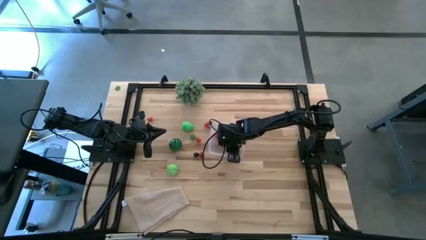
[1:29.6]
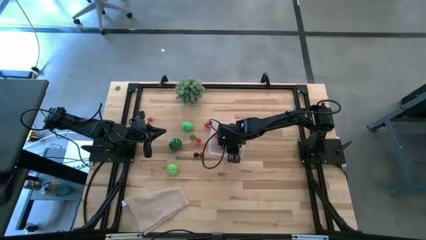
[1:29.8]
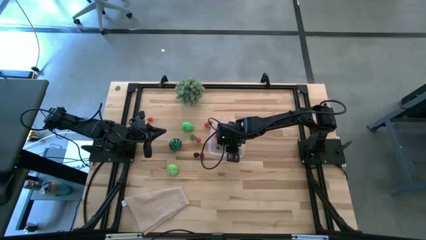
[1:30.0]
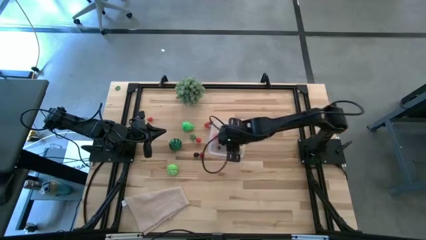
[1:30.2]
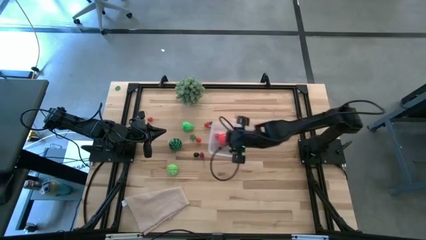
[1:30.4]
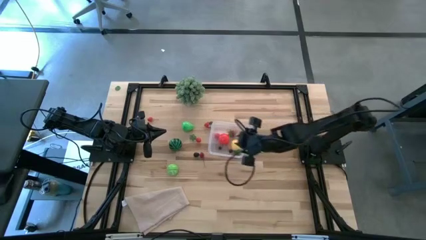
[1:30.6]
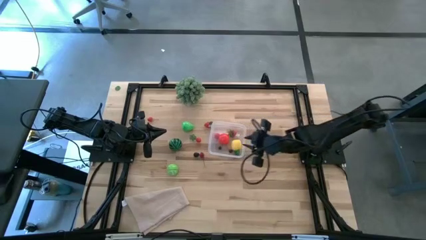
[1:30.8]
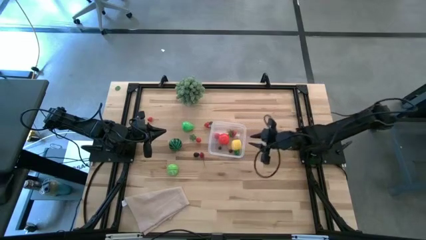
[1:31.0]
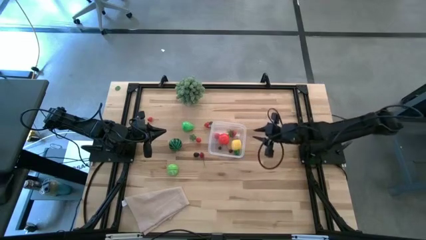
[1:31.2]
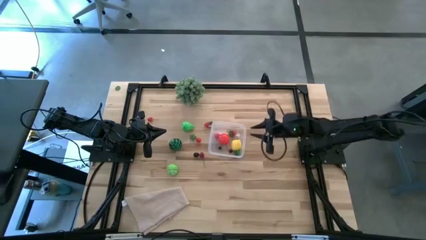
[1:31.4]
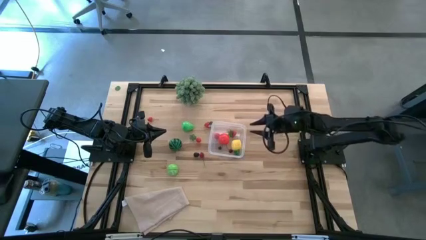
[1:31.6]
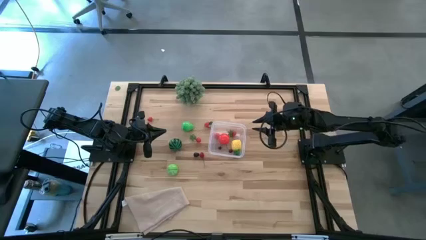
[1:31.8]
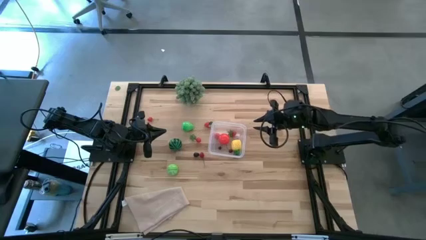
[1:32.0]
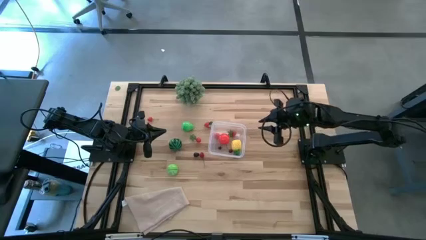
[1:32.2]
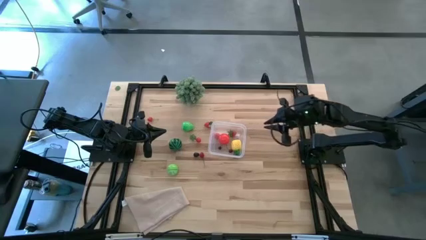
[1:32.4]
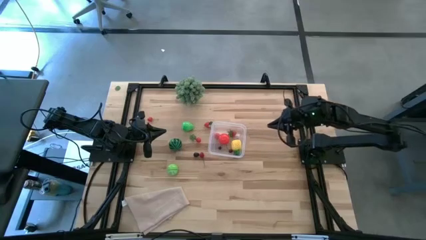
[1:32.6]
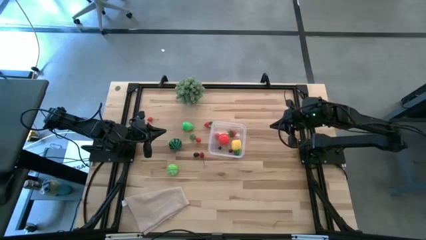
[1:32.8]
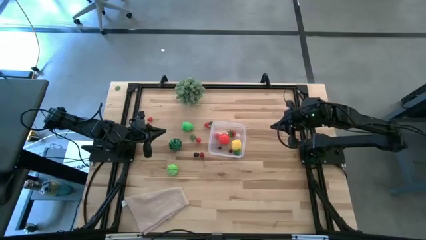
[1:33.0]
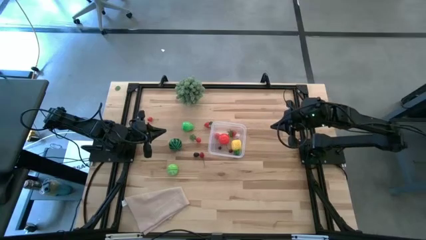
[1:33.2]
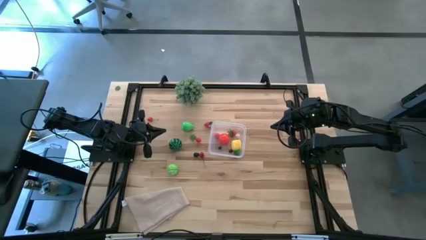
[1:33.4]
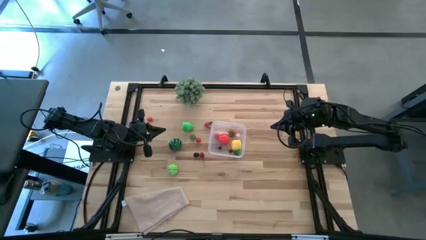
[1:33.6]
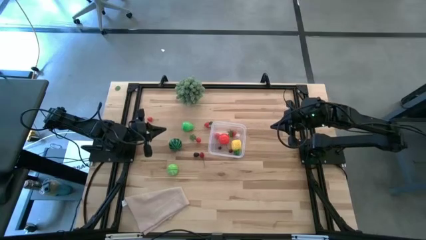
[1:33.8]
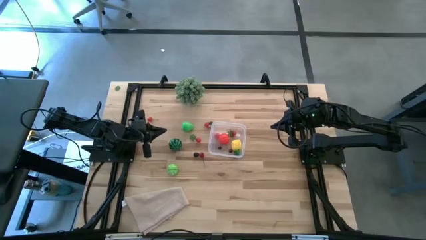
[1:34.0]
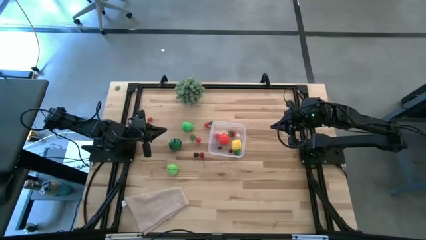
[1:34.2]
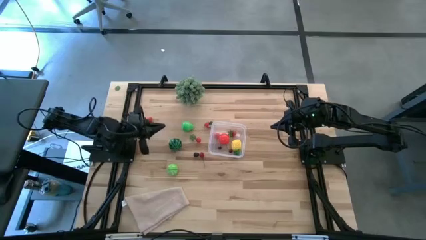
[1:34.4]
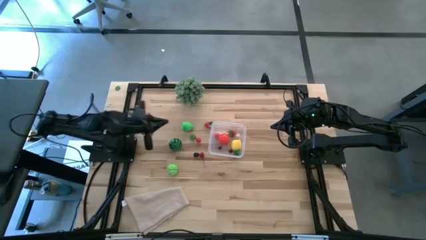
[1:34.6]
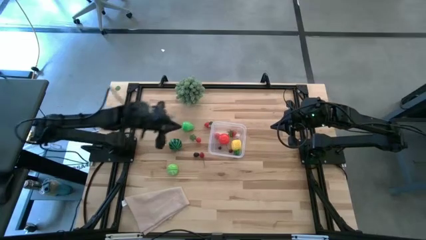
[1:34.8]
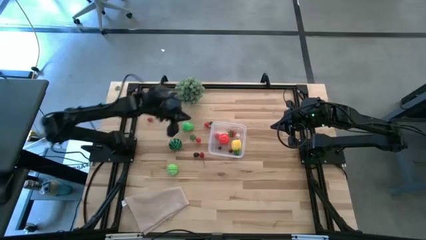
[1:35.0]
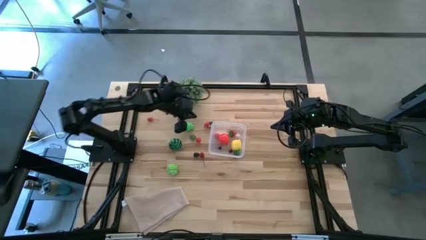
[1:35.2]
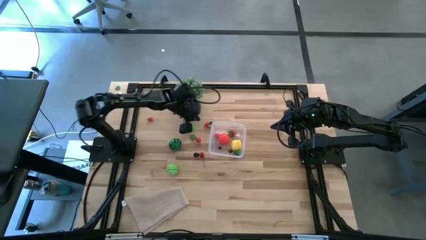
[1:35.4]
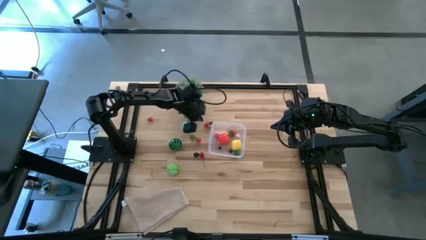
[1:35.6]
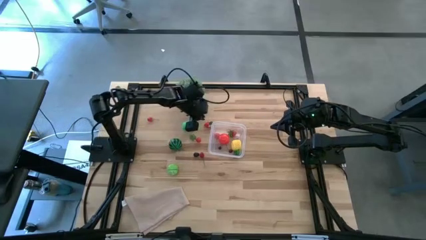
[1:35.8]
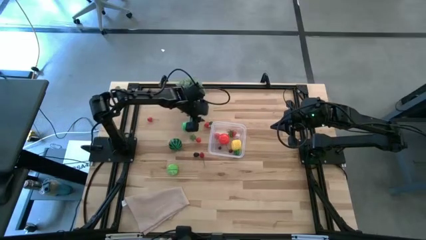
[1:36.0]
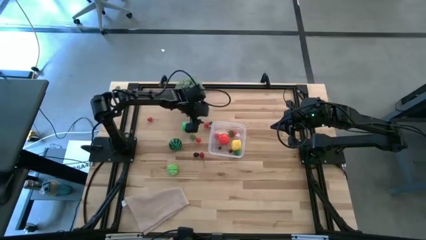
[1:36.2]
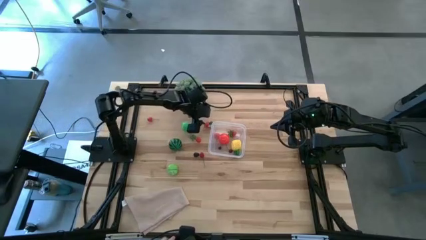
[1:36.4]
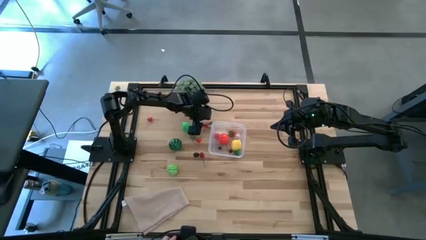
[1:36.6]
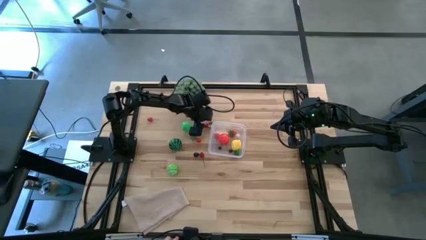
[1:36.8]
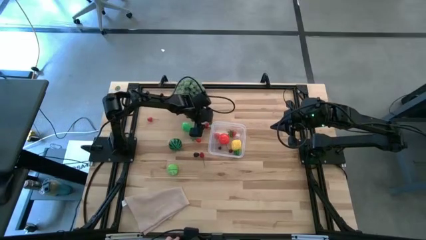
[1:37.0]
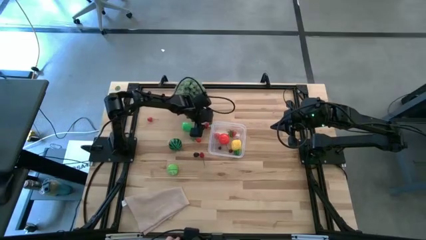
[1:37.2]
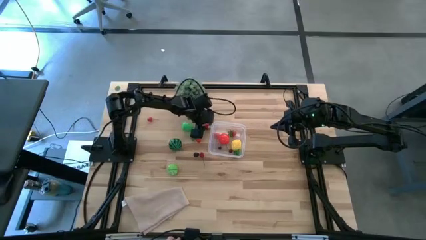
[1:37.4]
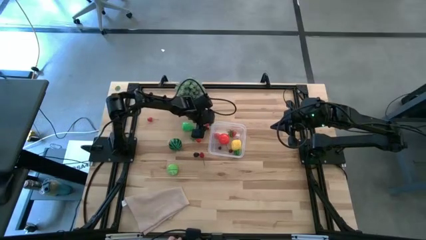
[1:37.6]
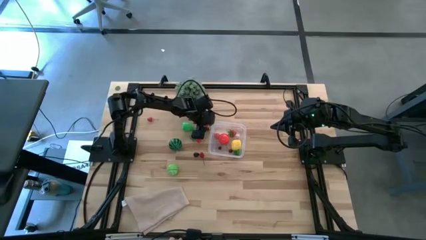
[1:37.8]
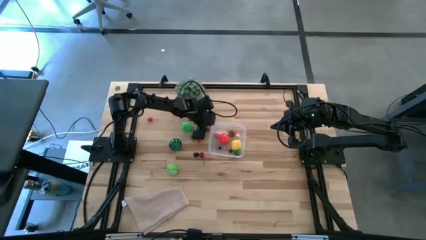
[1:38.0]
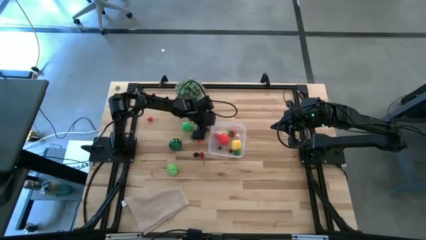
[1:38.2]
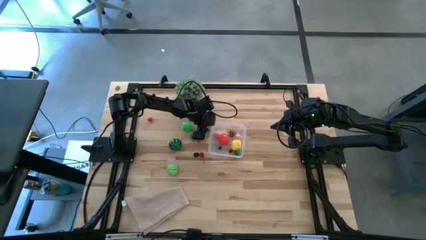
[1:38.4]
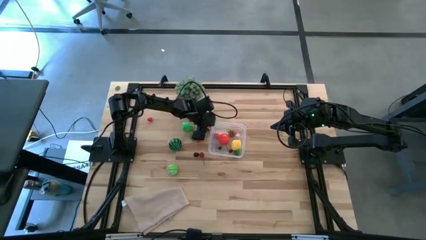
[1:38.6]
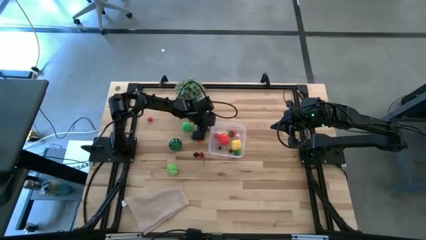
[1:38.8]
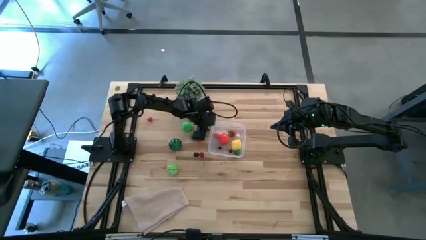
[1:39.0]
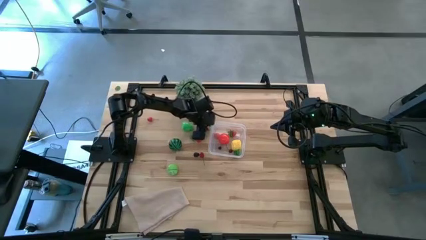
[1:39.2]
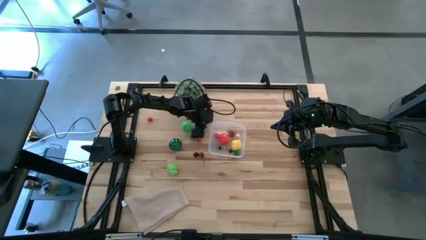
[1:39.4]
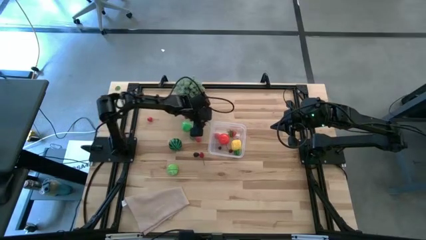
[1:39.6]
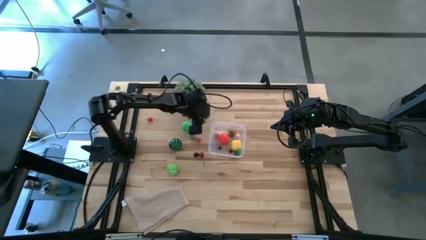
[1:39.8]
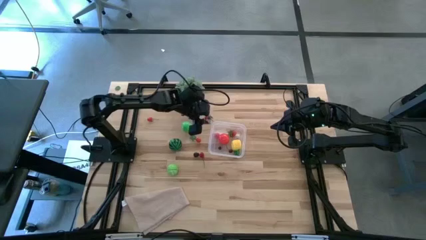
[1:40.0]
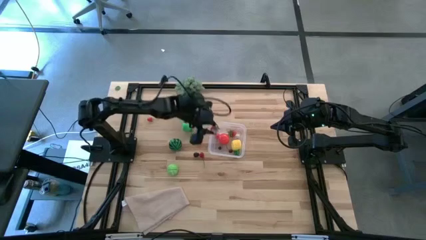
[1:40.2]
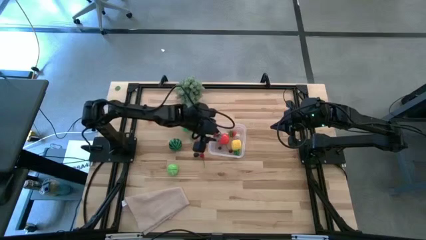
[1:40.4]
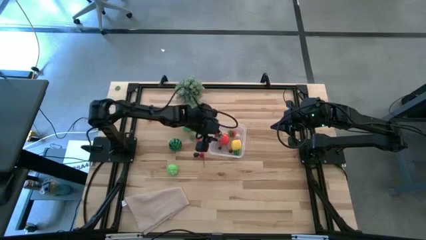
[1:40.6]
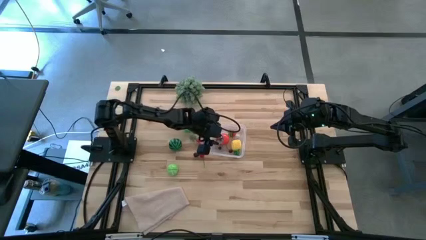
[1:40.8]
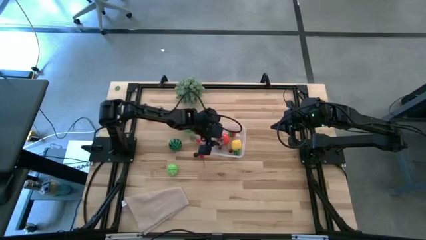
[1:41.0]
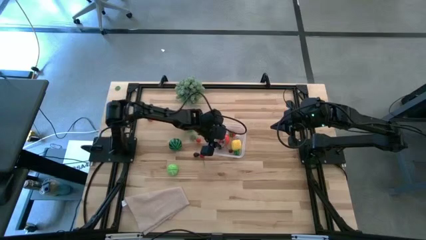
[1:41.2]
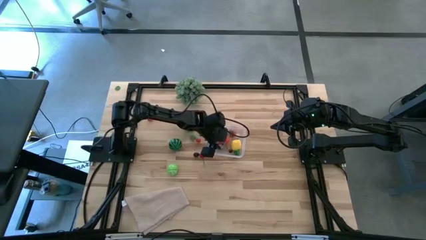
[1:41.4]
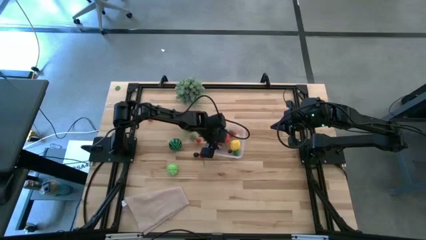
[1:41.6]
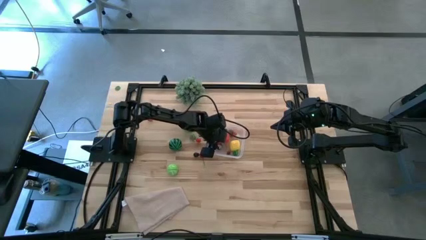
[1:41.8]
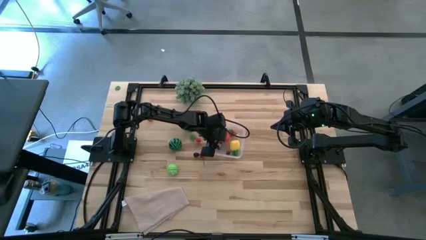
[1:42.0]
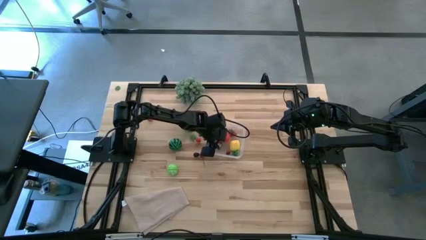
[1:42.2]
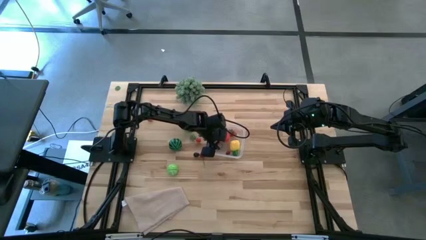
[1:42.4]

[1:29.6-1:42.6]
Task: Pick and placing Produce into tupperware
Put the strawberry into the transparent bin

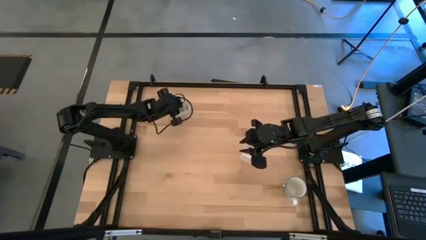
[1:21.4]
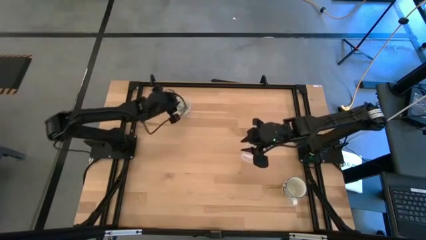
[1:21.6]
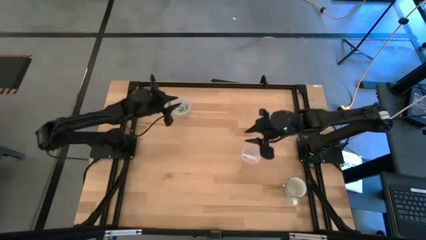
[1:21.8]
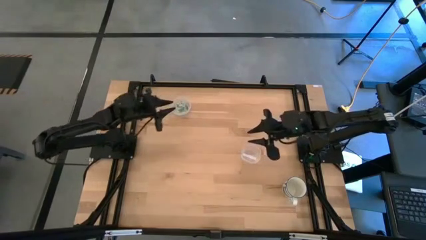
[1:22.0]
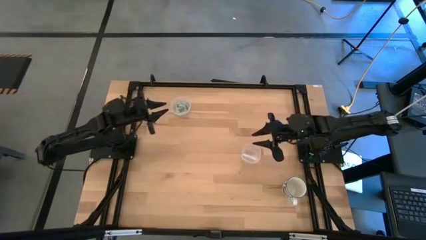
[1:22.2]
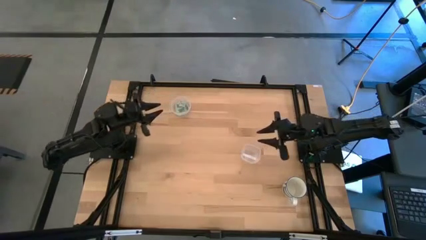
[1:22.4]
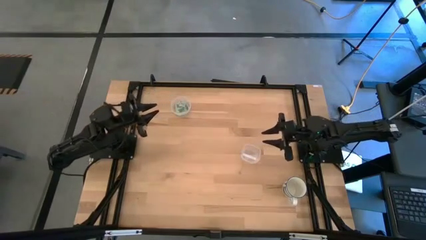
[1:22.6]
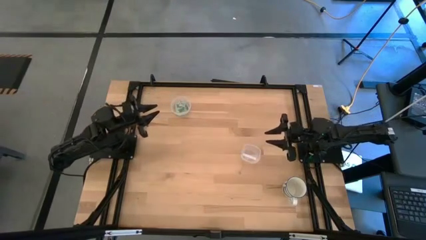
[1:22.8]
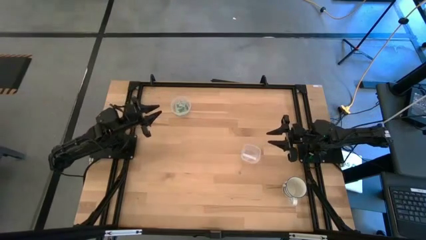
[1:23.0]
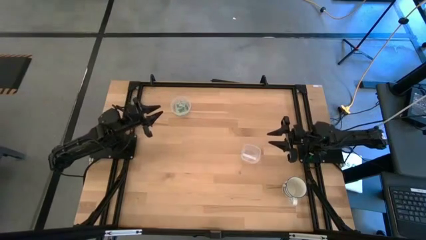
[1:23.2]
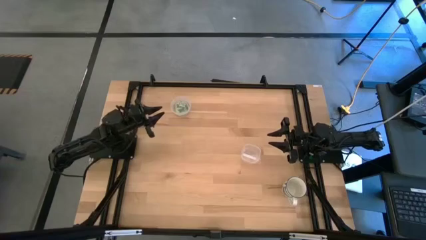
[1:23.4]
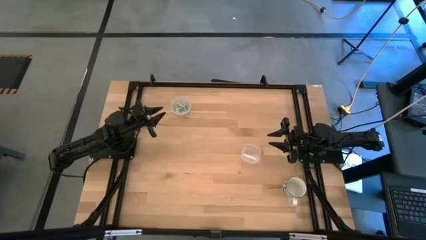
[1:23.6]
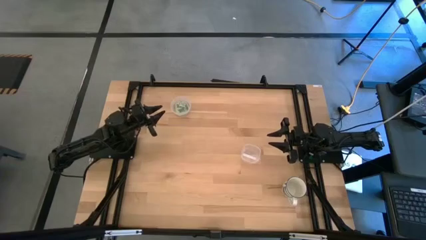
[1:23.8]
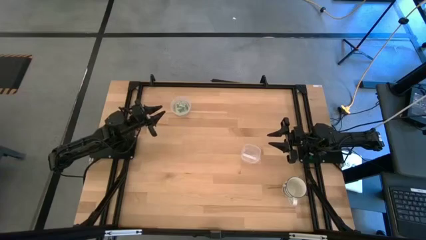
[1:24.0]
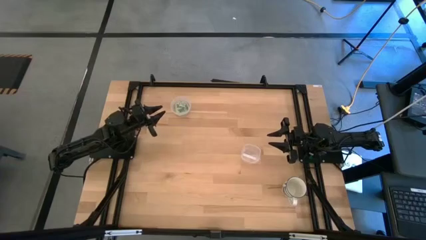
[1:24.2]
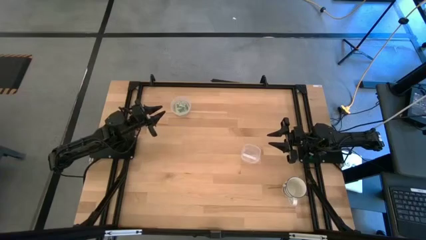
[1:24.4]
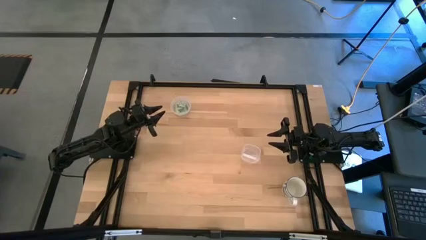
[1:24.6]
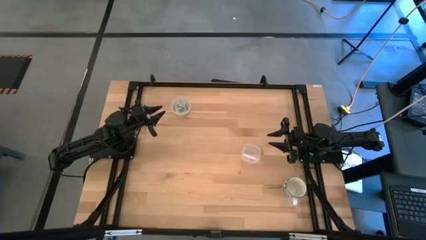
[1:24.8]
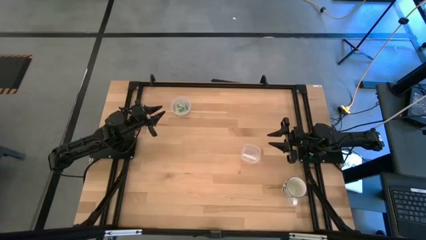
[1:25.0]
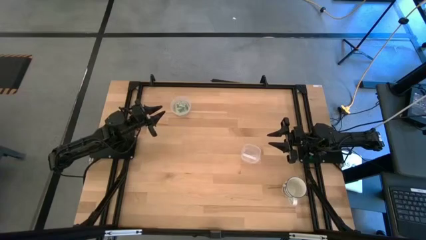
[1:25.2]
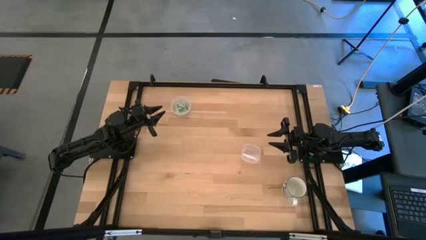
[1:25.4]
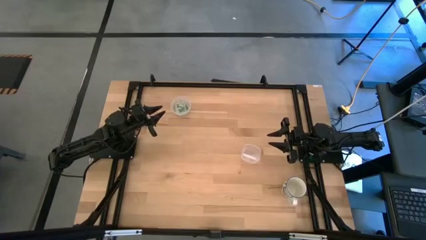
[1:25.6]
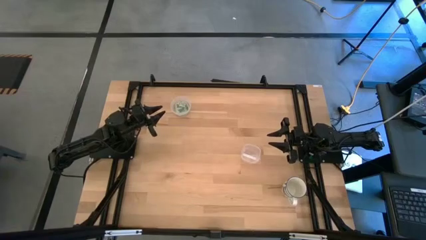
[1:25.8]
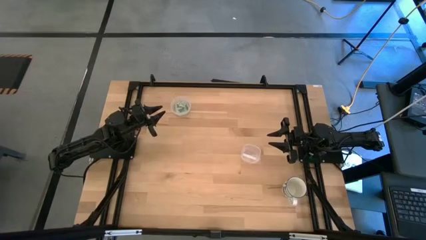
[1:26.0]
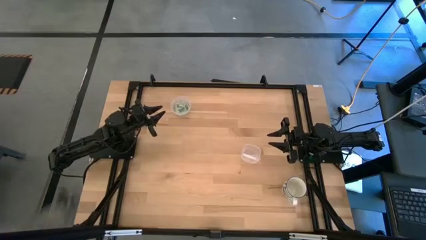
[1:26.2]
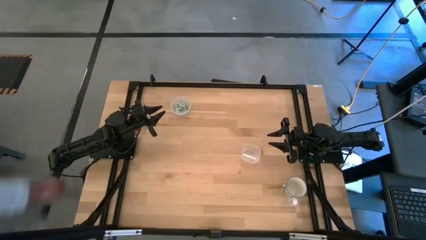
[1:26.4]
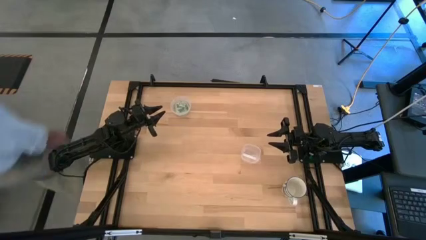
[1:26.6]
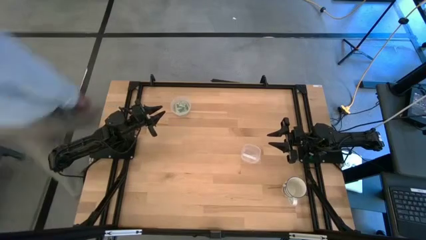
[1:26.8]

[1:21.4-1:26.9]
Task: Pick and place Stevia / Truvia into bins
Return to Home Position
